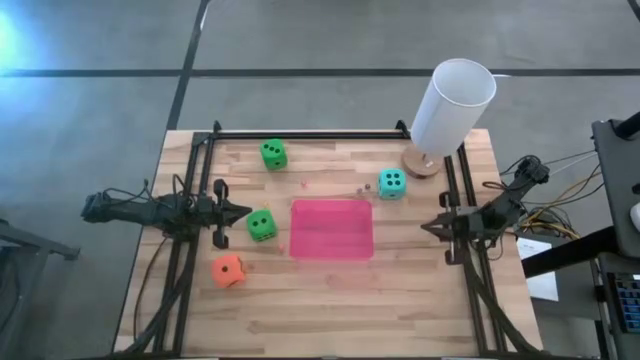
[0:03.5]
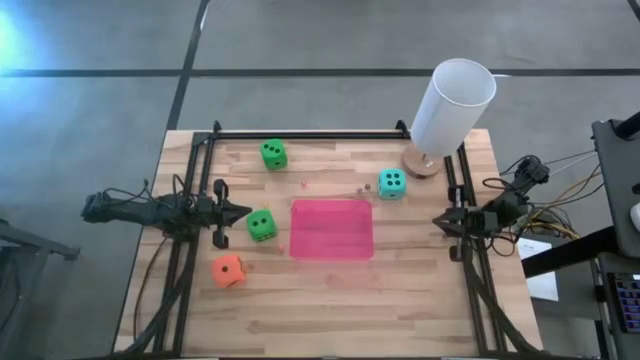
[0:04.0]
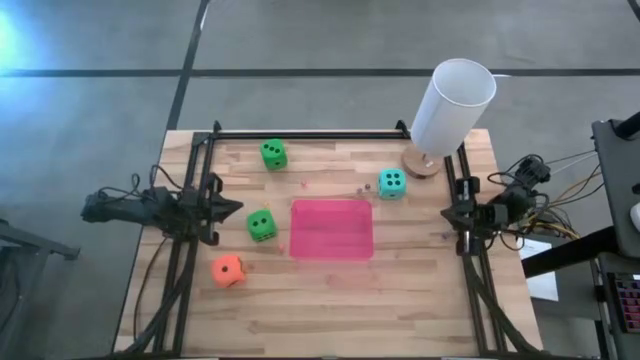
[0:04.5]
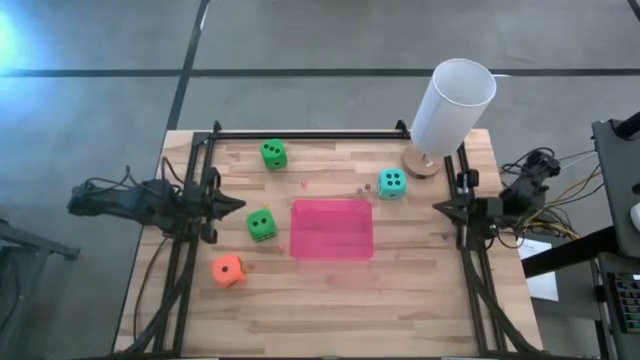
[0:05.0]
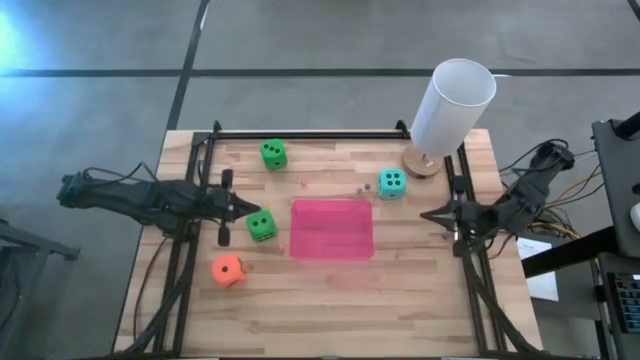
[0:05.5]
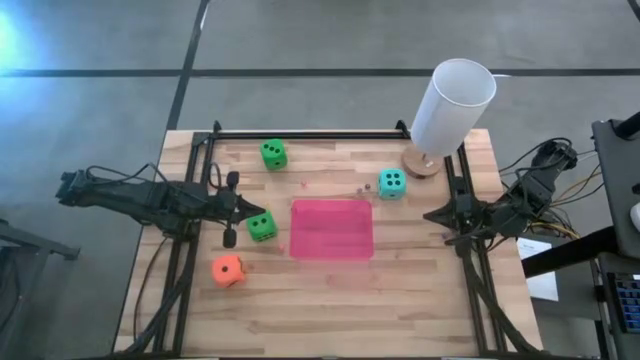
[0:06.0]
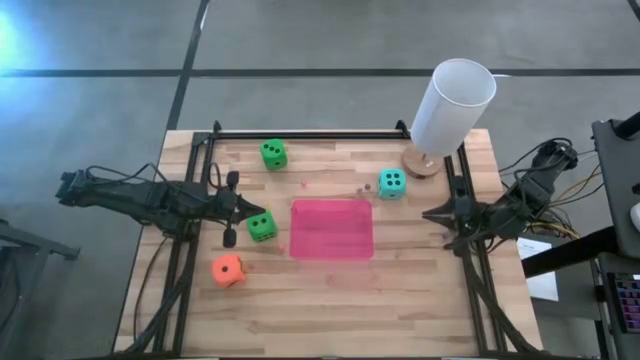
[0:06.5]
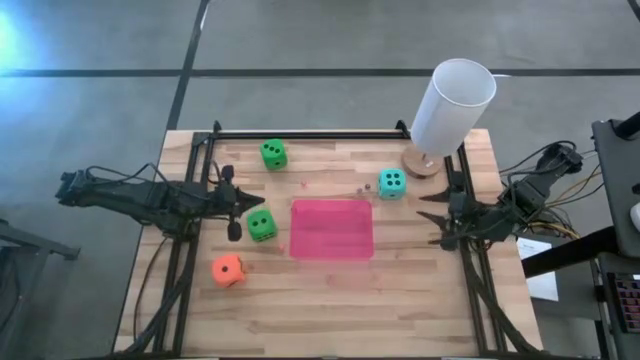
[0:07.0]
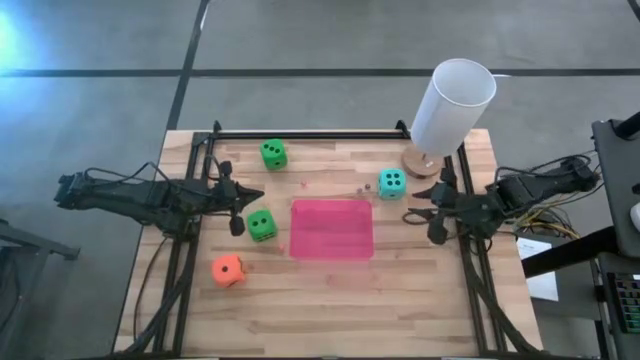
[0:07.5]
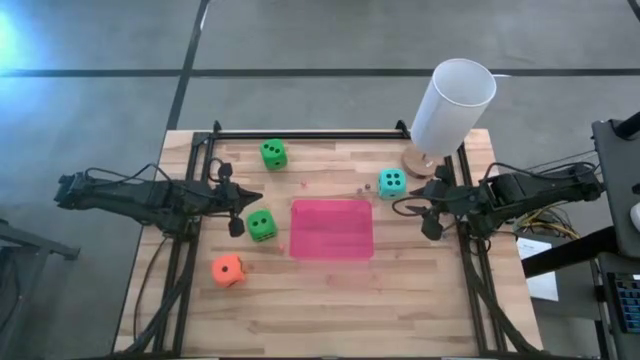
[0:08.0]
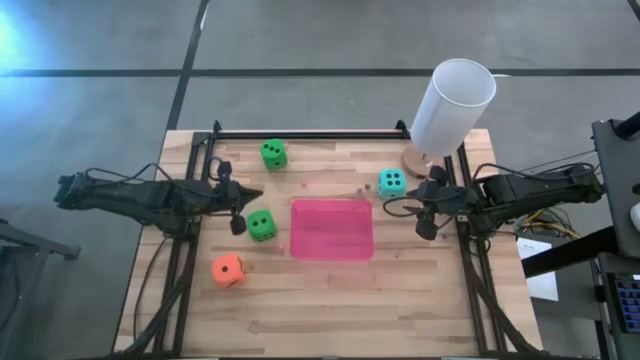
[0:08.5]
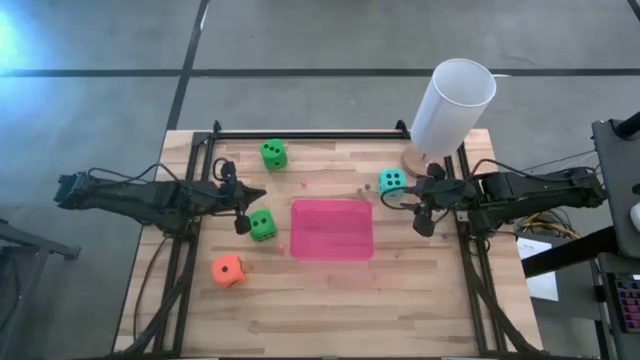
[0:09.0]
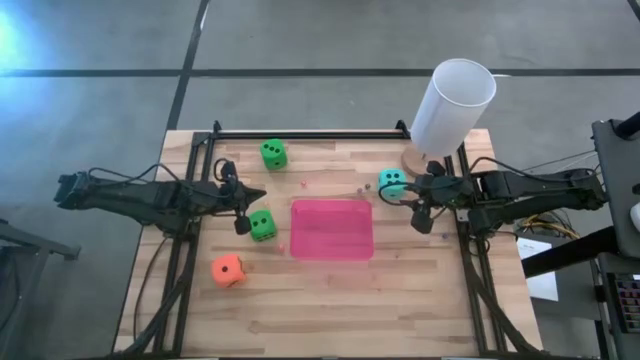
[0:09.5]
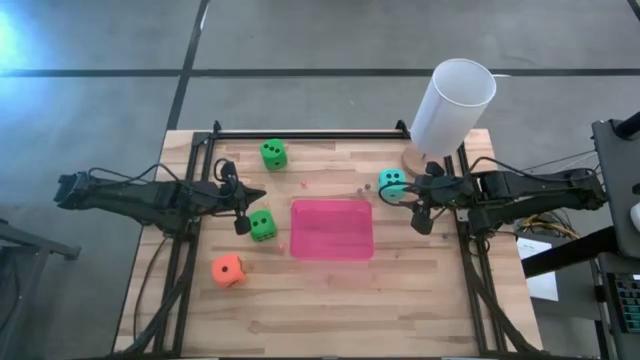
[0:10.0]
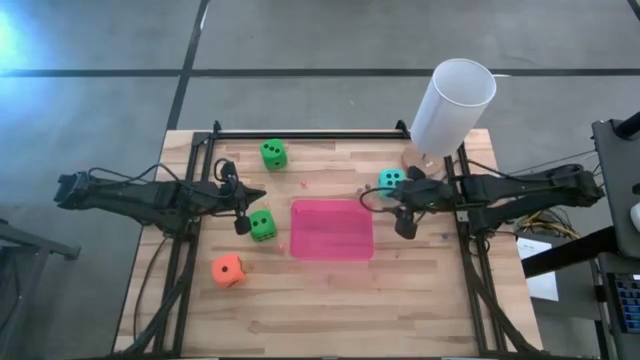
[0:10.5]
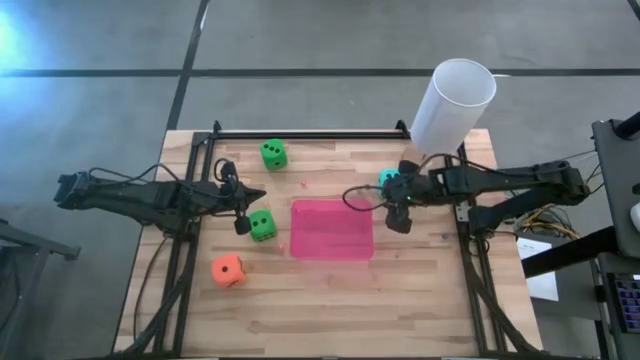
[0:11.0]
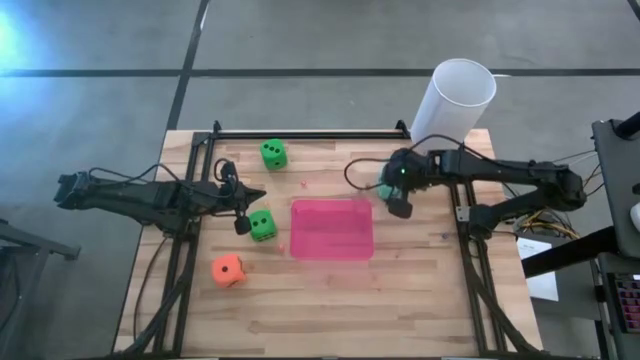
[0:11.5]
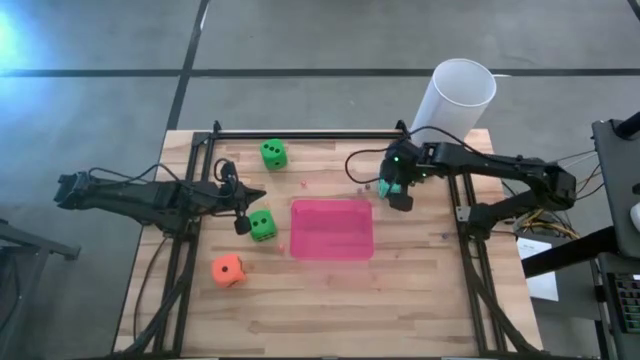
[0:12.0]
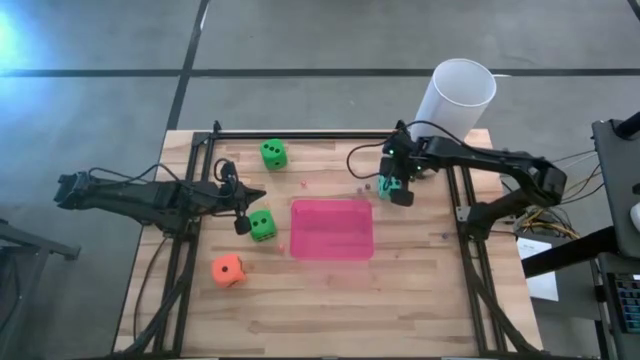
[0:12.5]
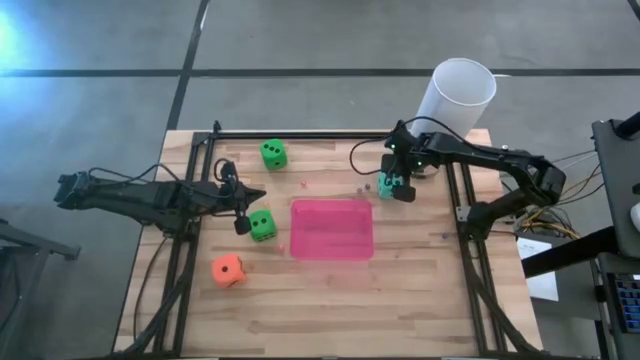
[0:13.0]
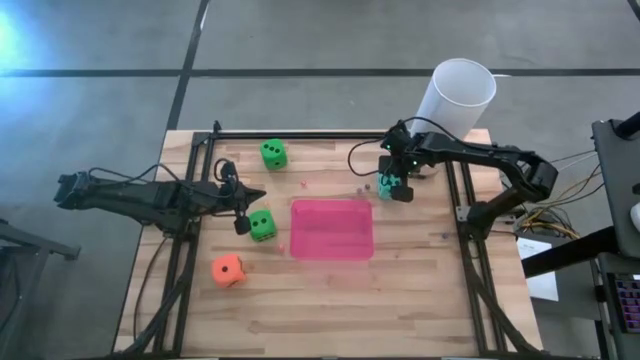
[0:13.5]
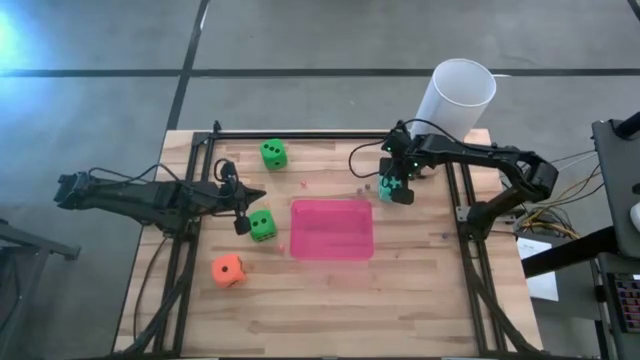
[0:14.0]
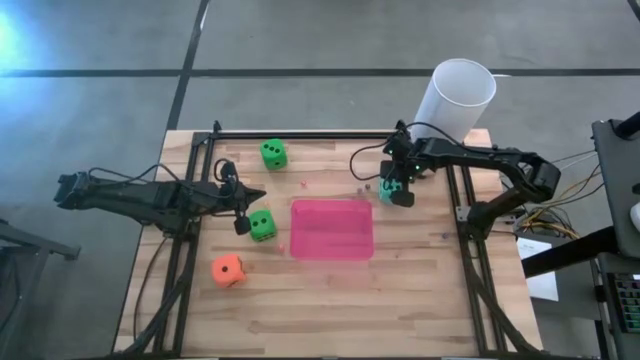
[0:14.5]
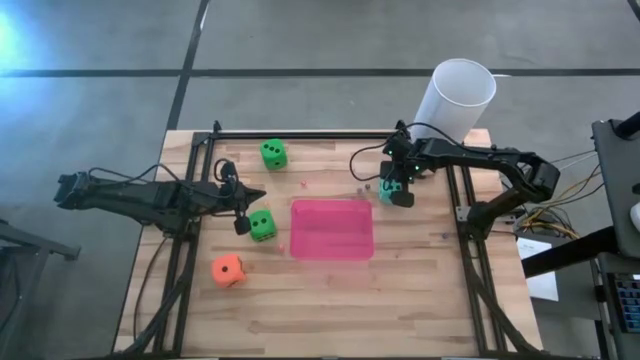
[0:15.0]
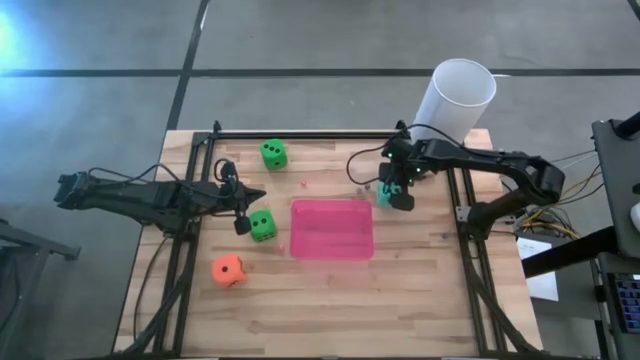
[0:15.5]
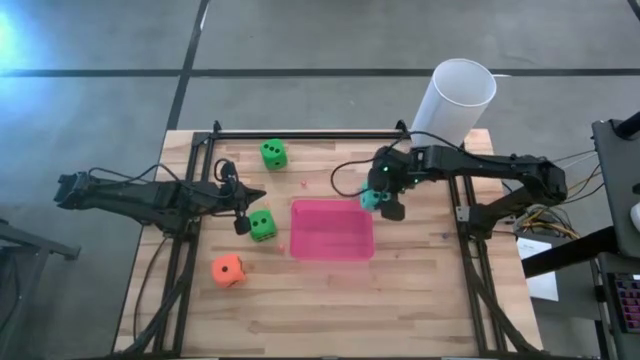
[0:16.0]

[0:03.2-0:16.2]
Task: Pick & Place Dice
Put the large blue die into the pink bin

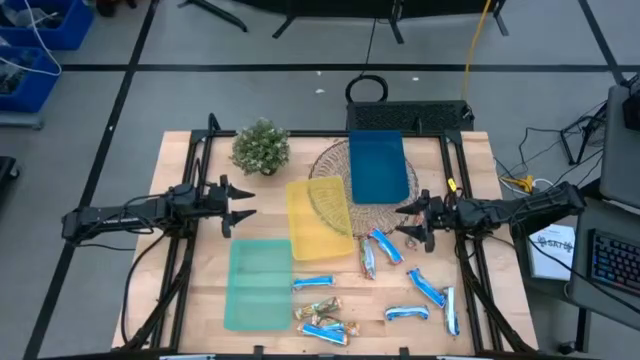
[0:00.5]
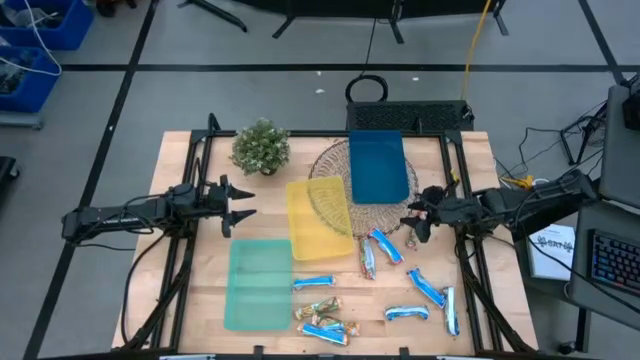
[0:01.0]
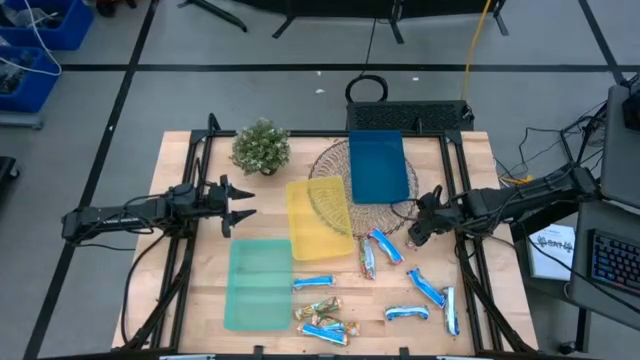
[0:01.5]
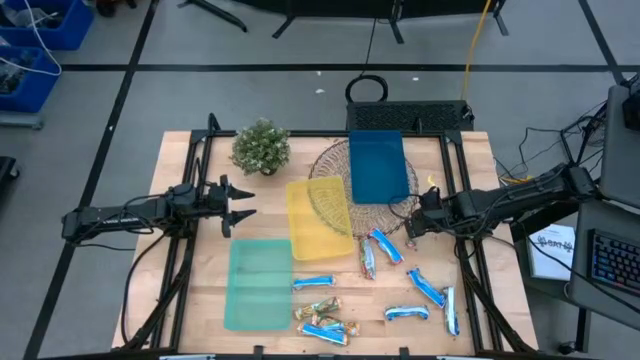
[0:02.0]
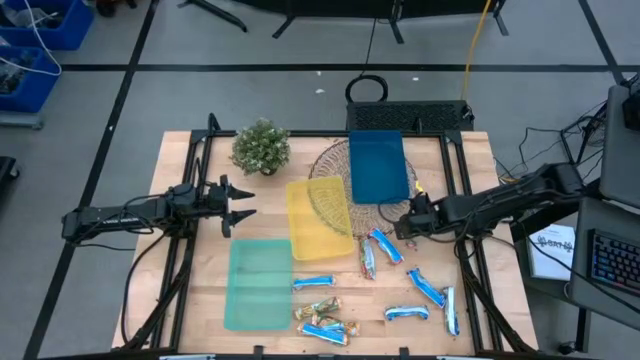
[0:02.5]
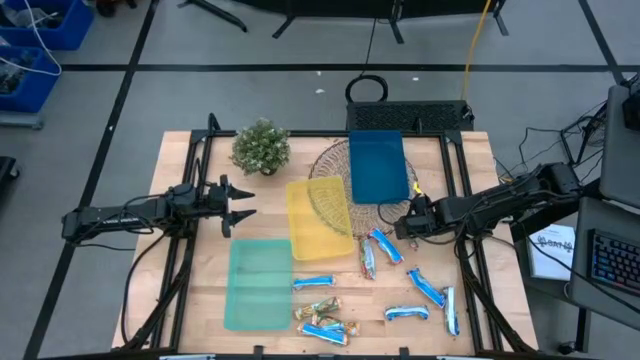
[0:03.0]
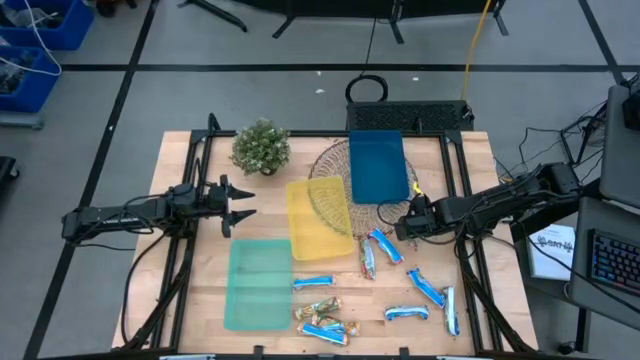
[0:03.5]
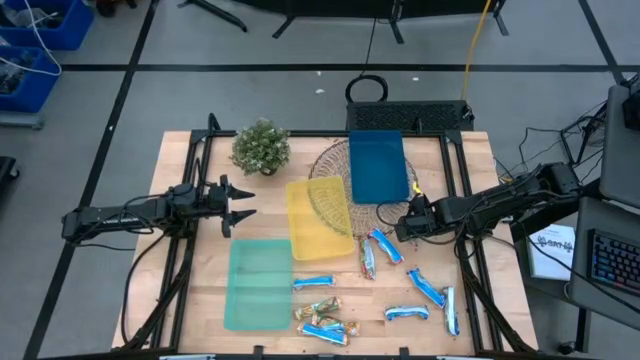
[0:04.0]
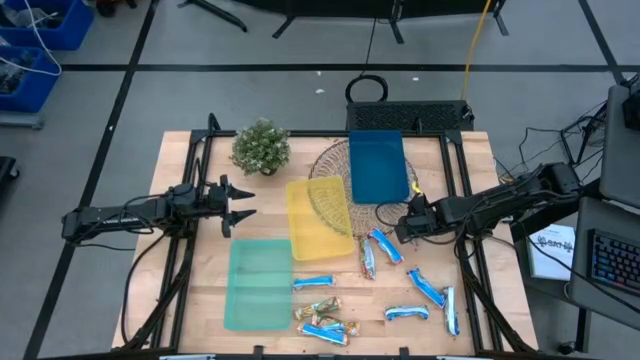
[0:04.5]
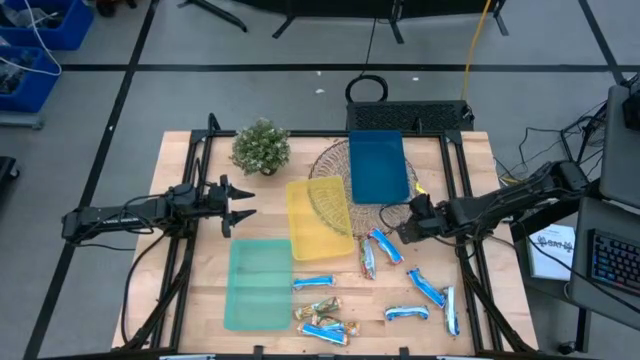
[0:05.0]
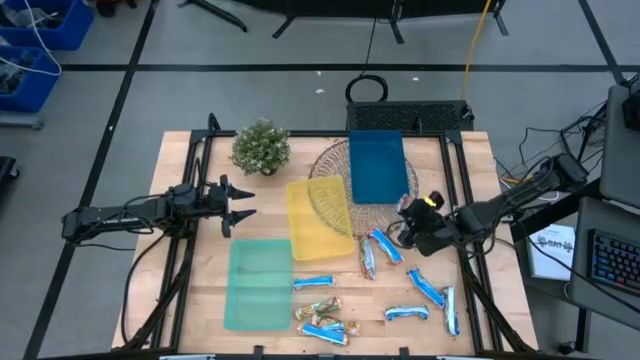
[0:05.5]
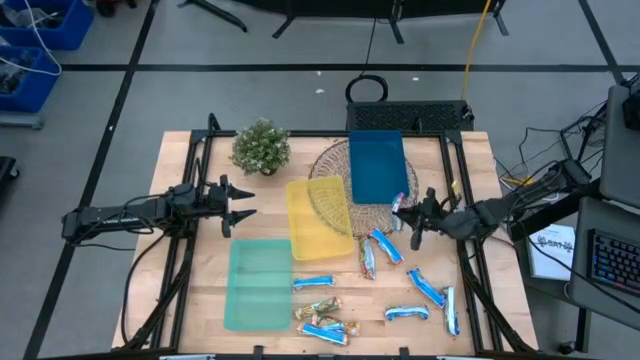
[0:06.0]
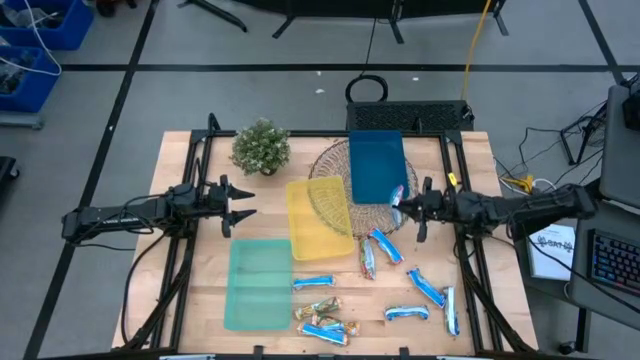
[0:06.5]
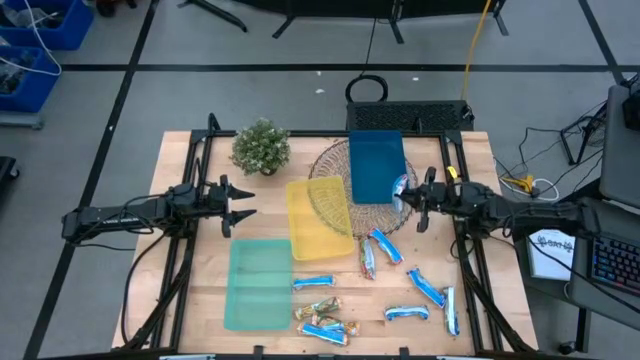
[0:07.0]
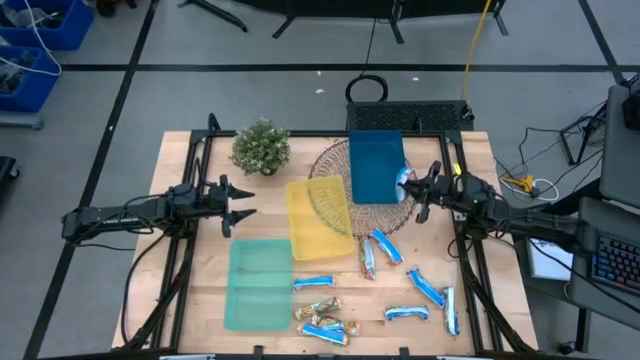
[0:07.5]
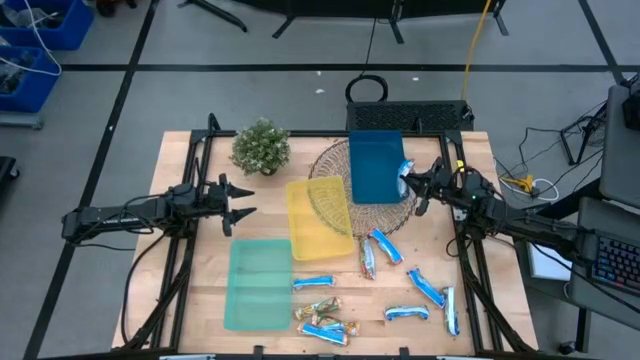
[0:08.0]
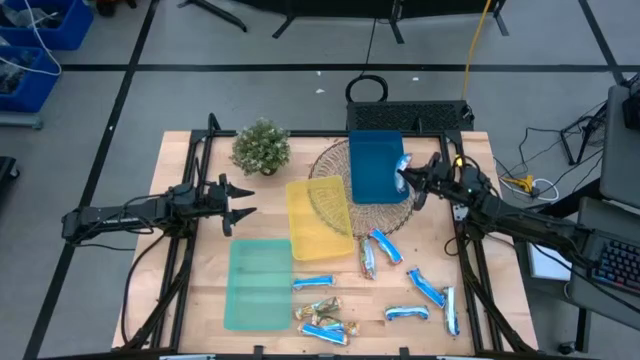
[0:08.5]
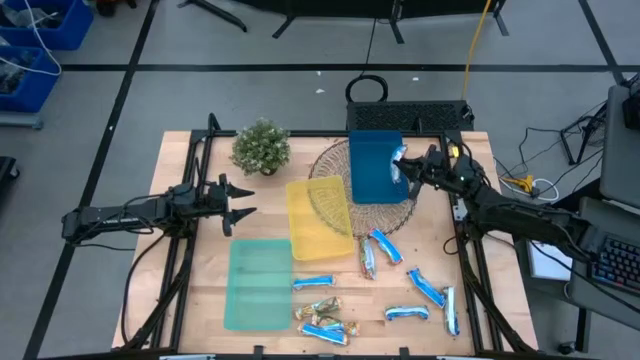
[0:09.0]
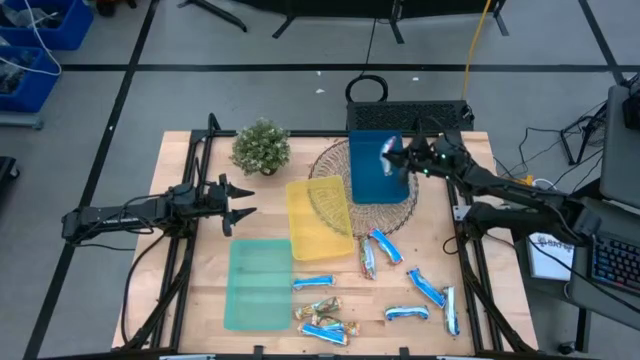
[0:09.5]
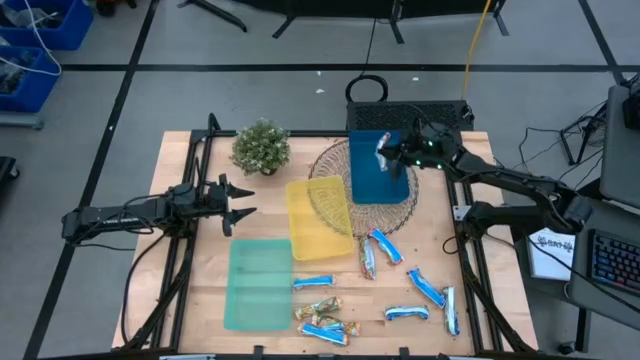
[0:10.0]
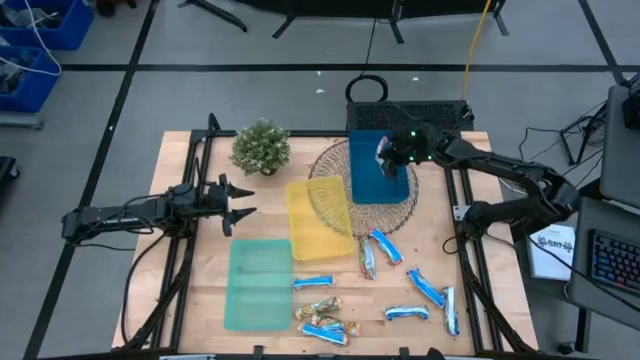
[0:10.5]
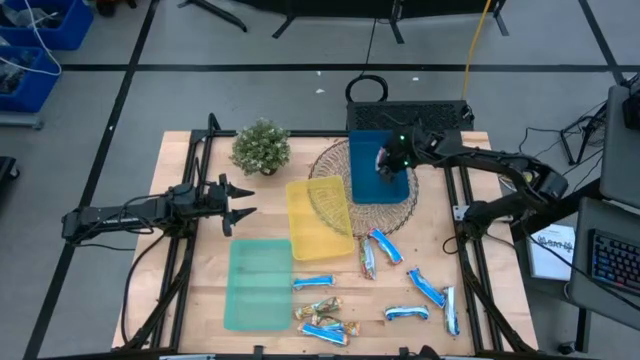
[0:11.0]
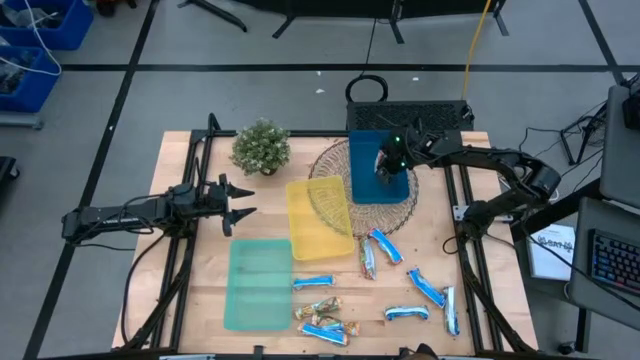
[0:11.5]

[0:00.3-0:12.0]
Task: Pick and place Granola Bars by type
Put the red granola bar into the blue bin
